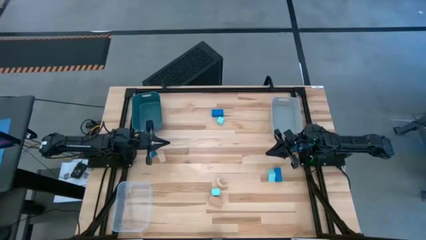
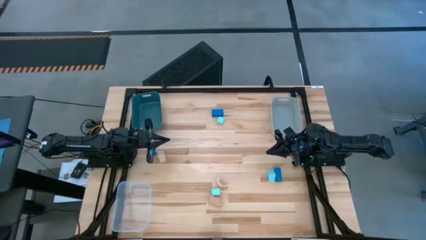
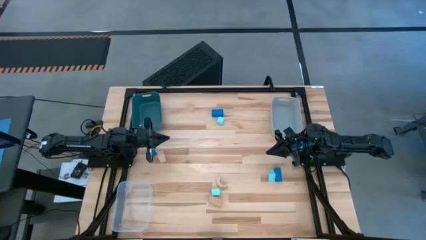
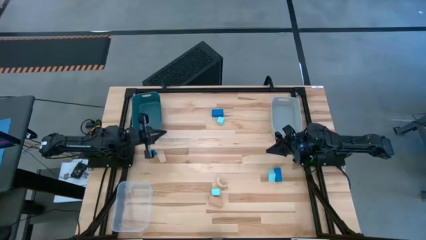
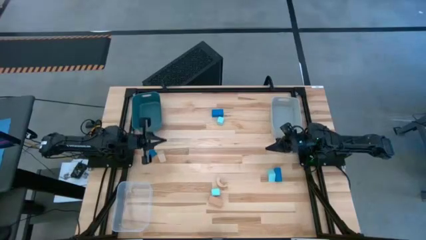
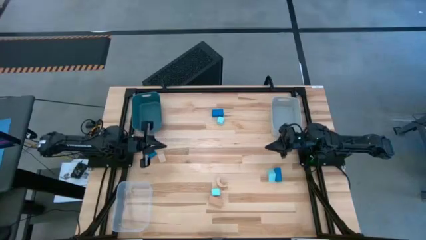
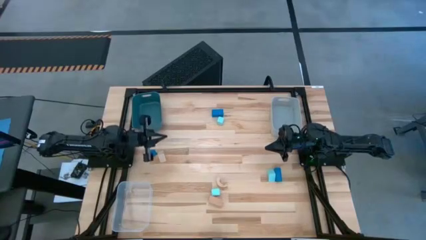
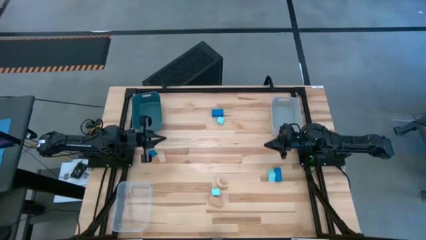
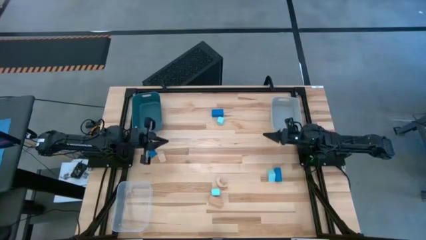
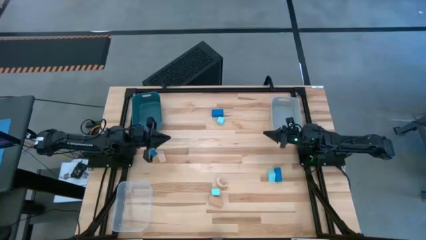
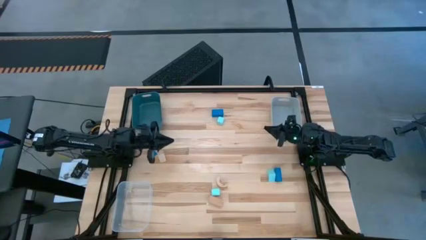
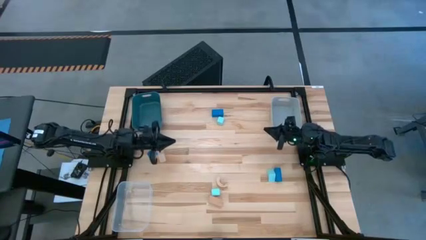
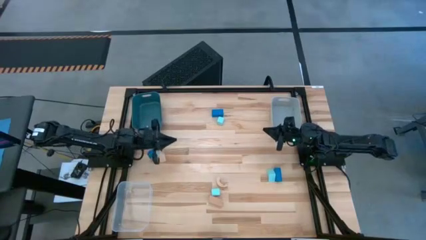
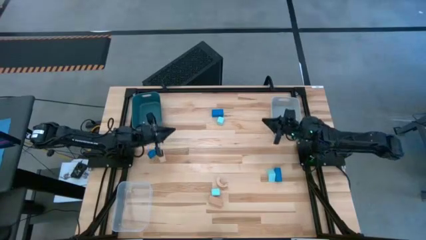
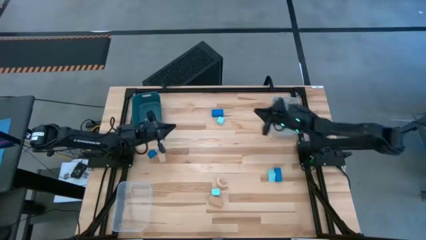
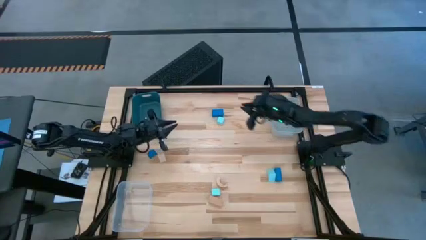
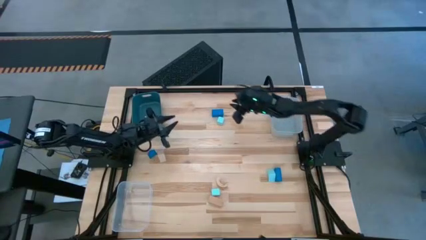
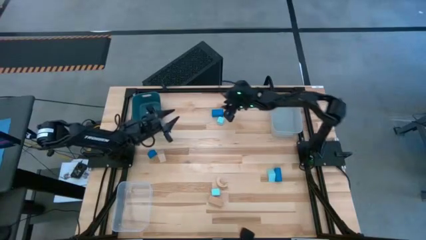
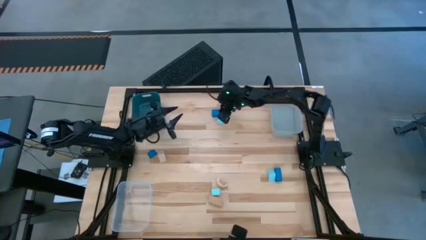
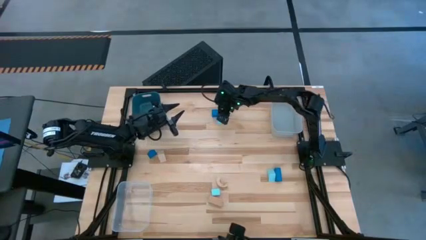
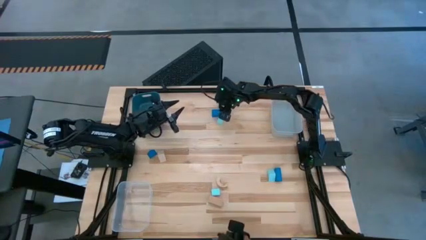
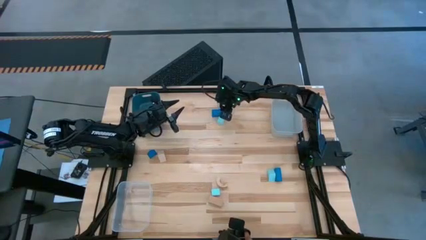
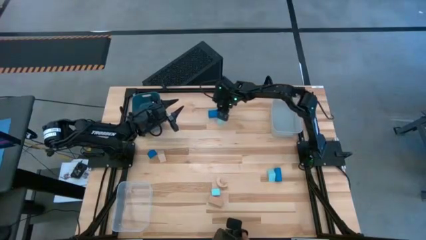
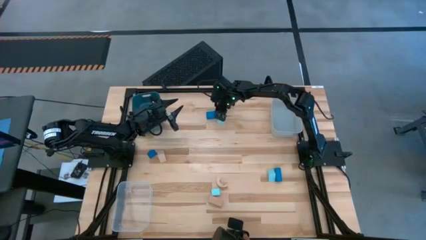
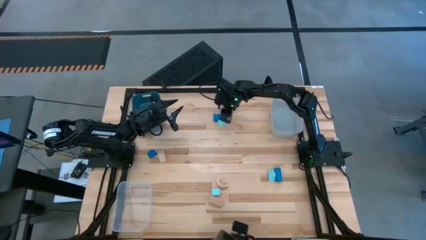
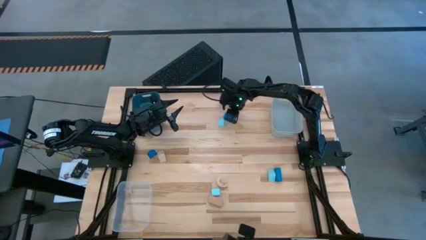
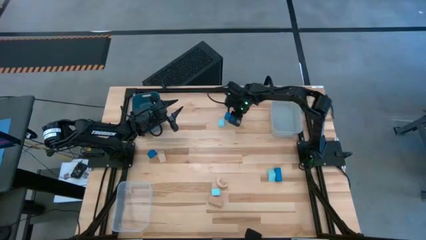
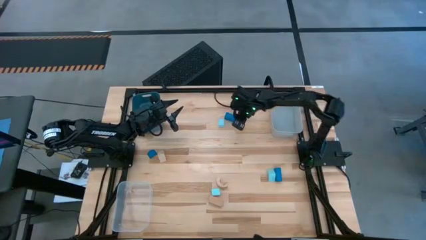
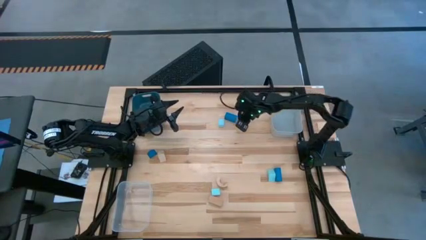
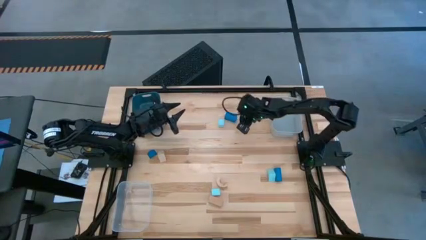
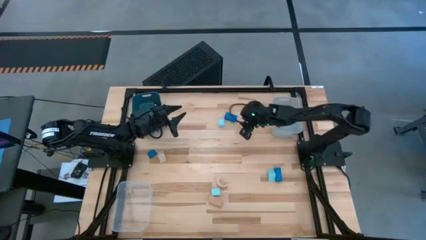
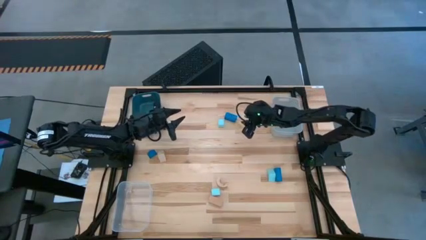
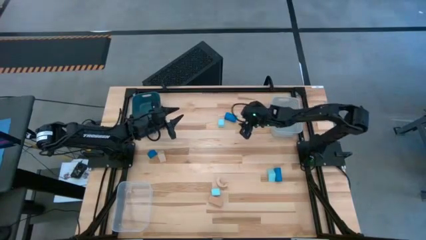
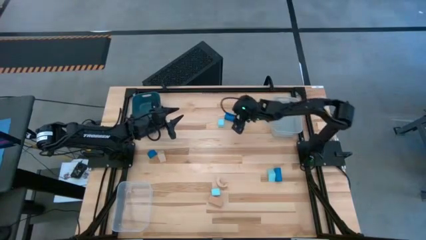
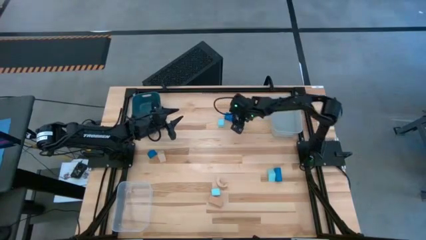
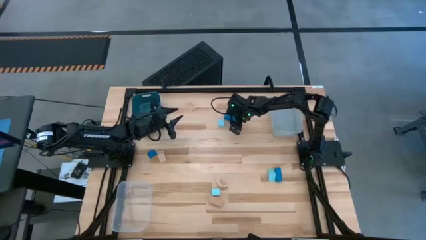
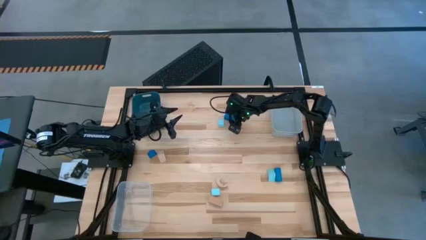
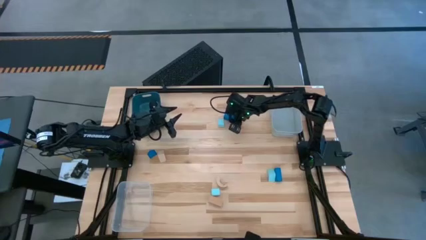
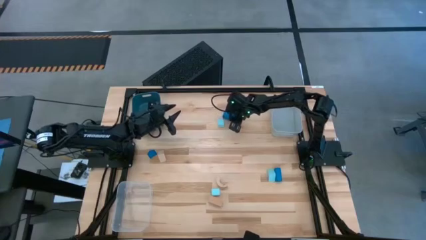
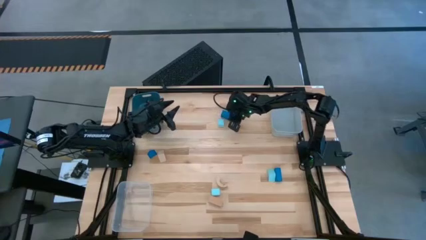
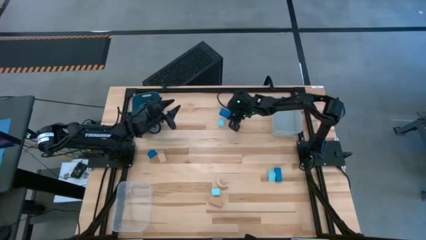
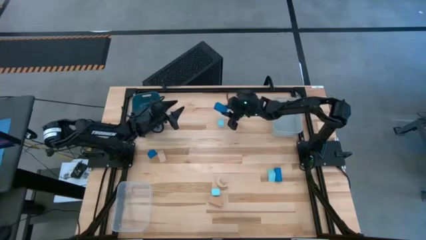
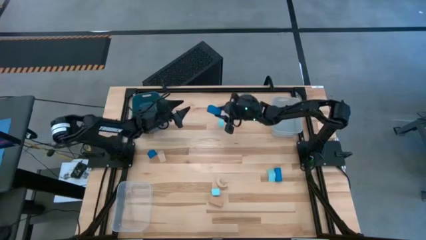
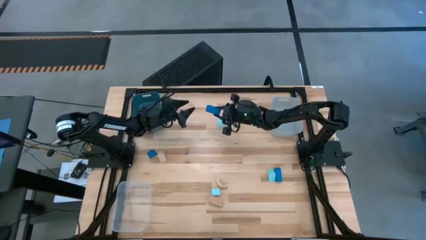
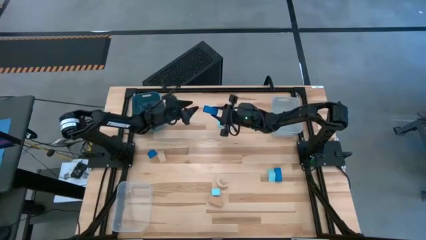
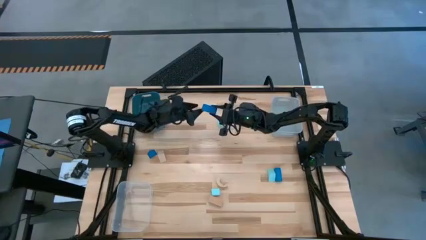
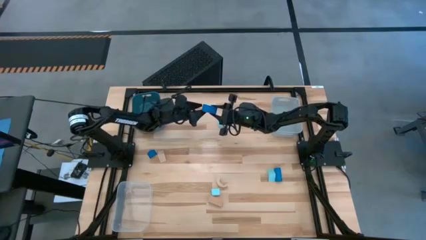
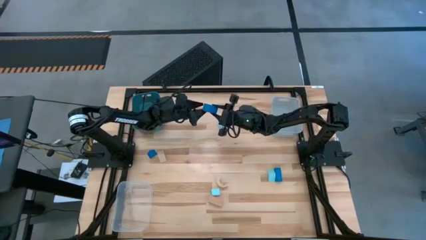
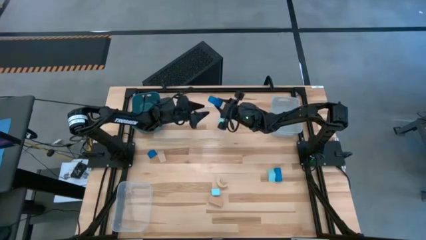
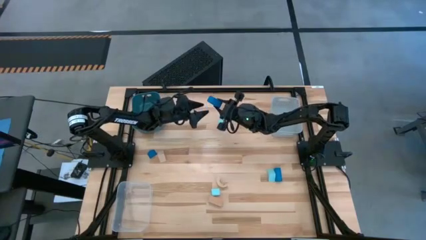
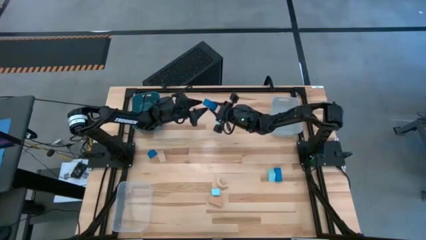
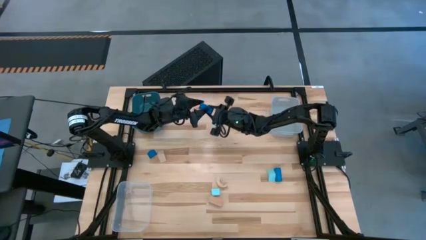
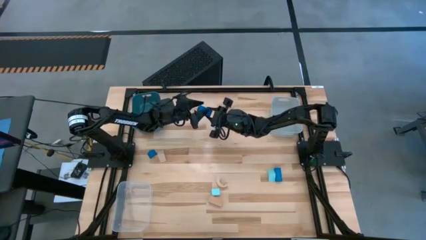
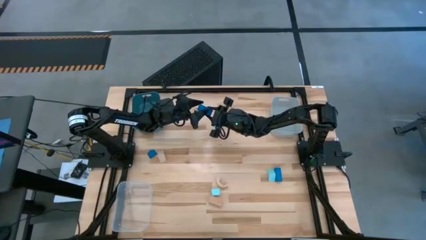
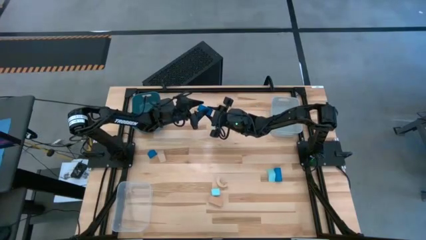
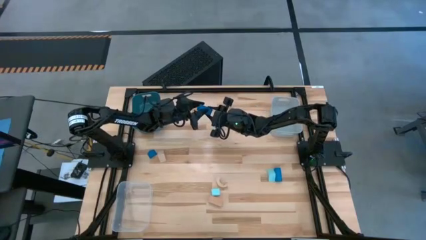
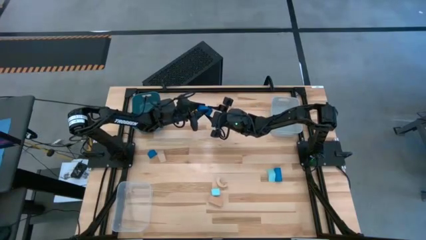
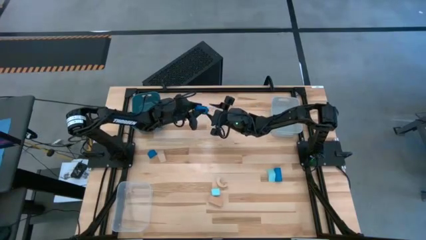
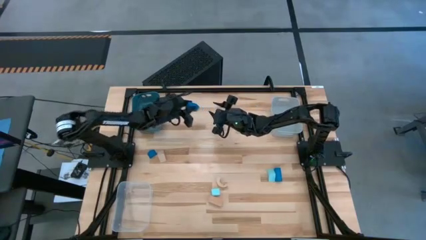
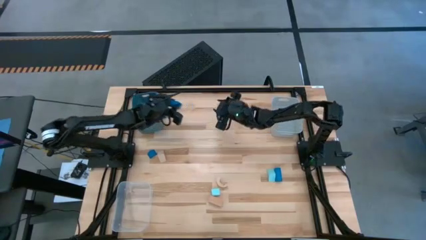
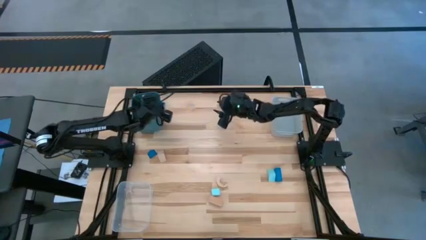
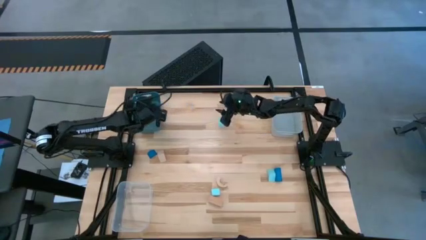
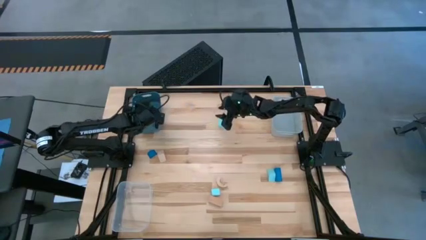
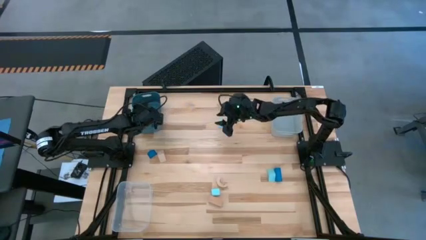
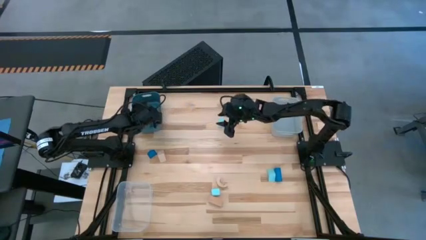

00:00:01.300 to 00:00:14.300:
Task: Sort & place blocks by color
Put the middle blue block into the blue bin
